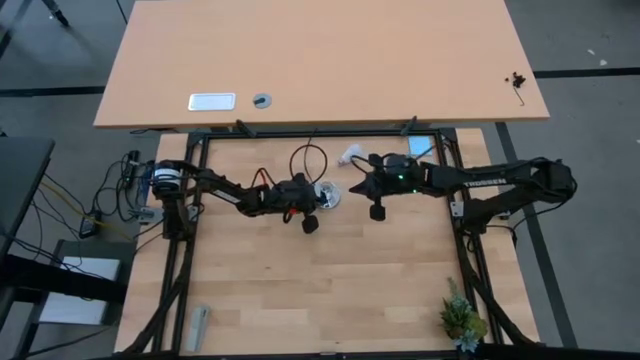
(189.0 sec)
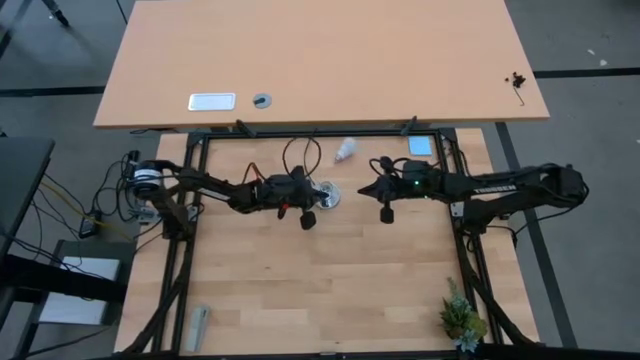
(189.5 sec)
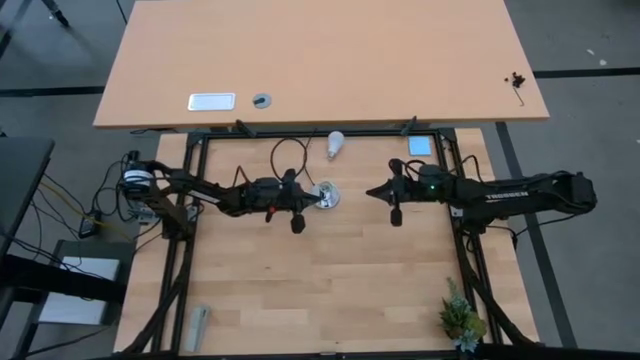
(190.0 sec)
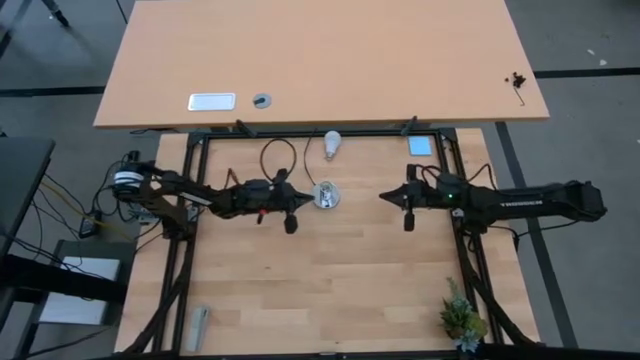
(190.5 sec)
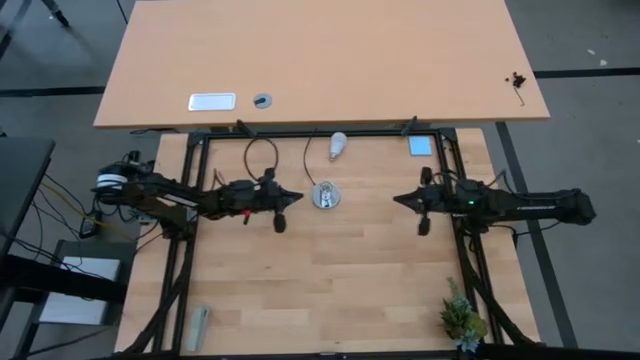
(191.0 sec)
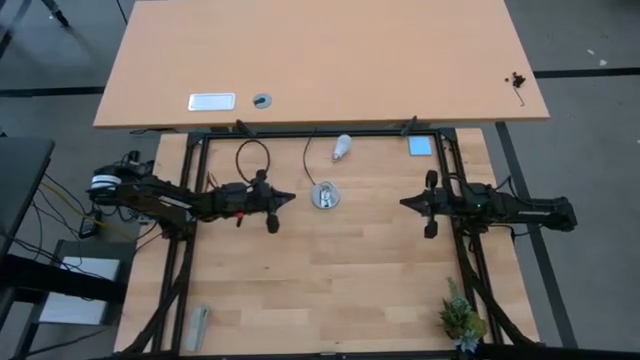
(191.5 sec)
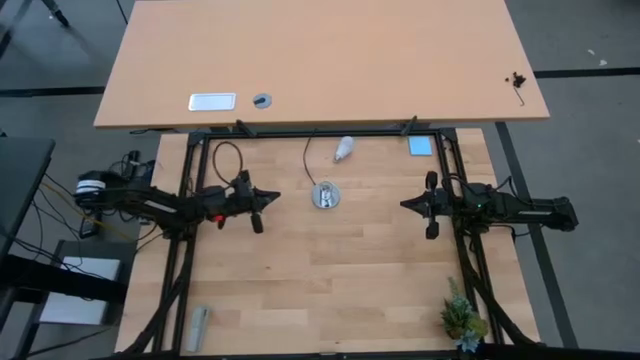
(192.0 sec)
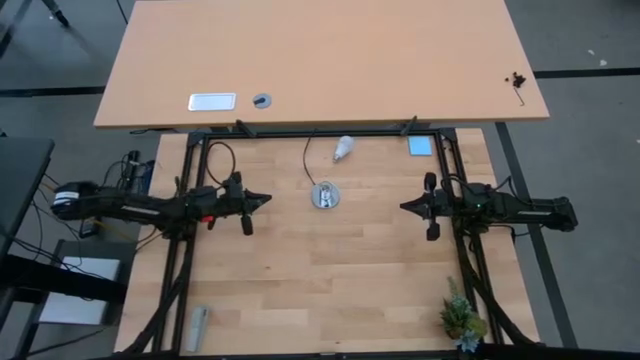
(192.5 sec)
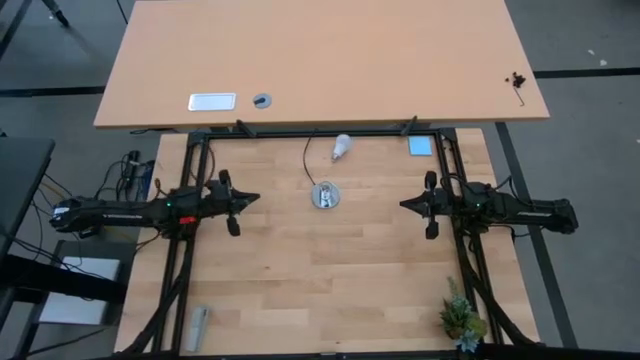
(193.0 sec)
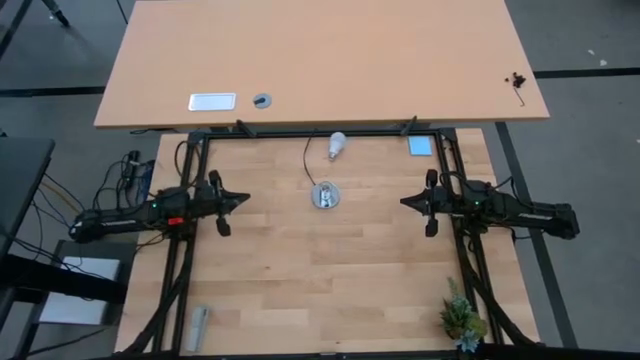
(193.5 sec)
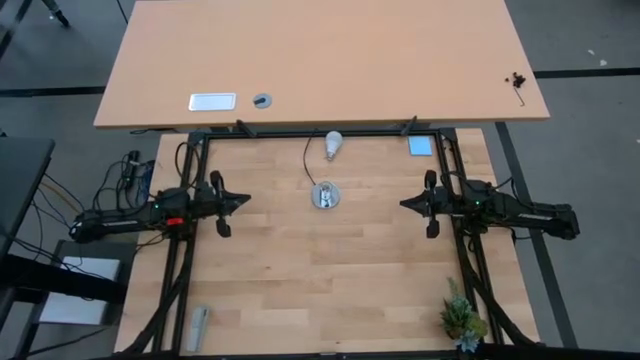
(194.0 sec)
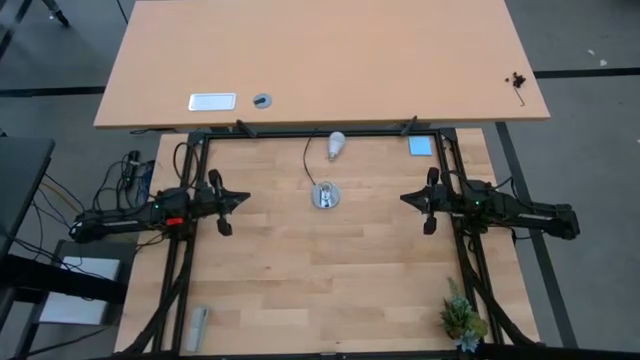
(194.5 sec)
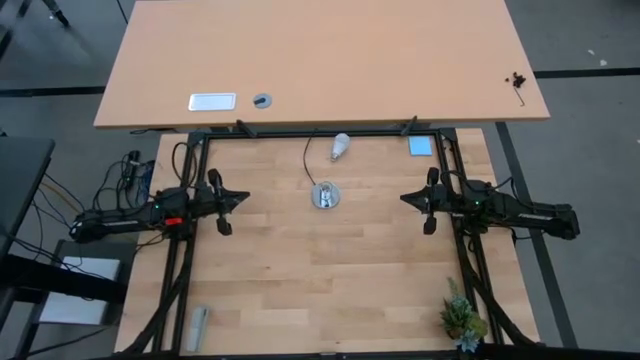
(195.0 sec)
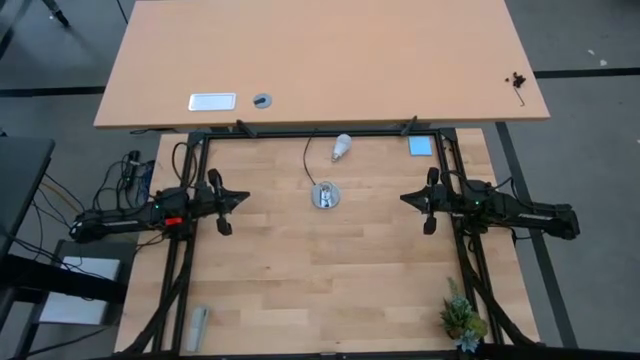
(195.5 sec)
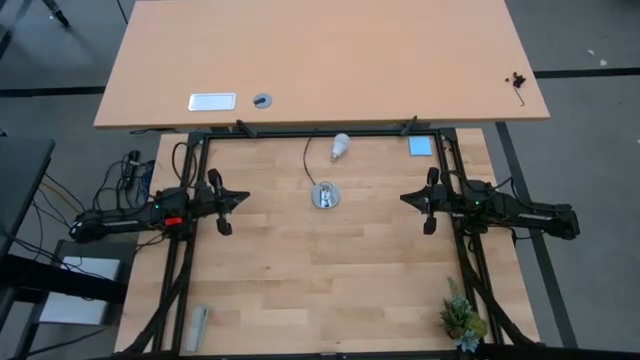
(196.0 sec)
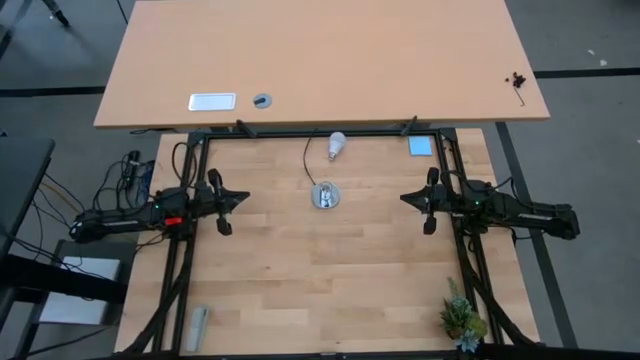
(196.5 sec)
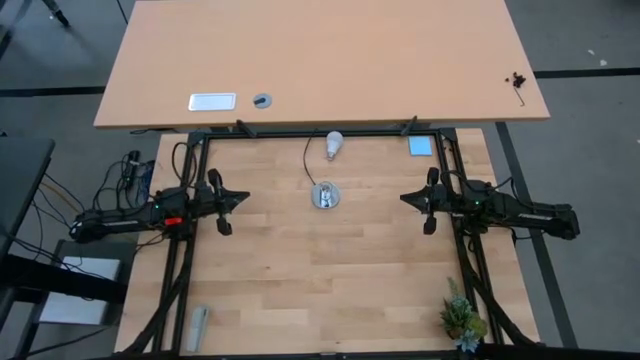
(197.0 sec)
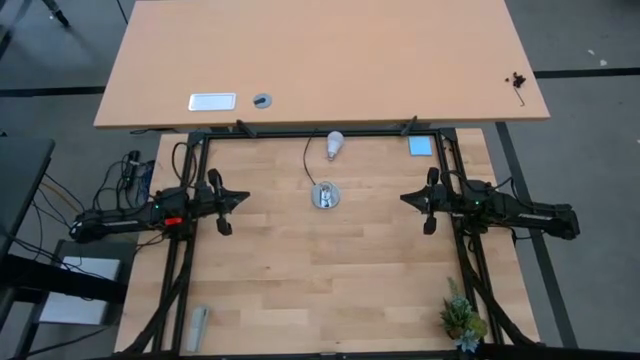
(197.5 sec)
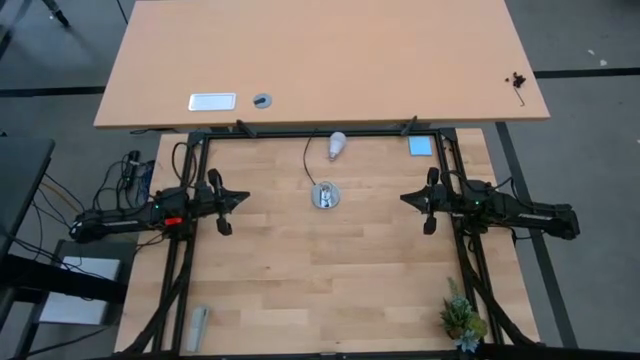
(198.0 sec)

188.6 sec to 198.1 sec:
Task: Screw lightbulb
Return to Home Position

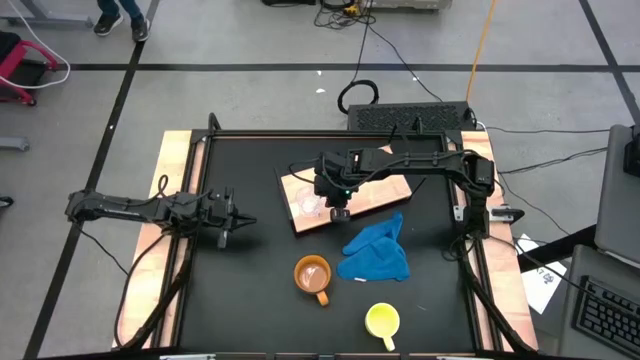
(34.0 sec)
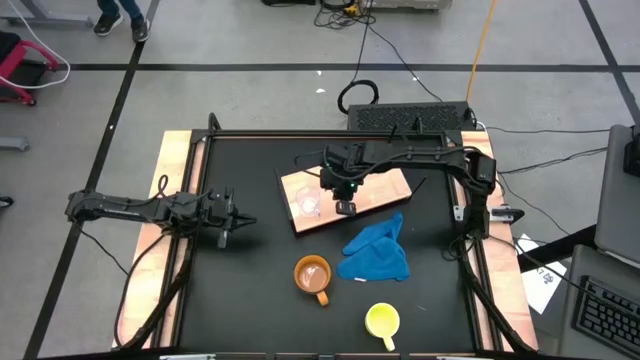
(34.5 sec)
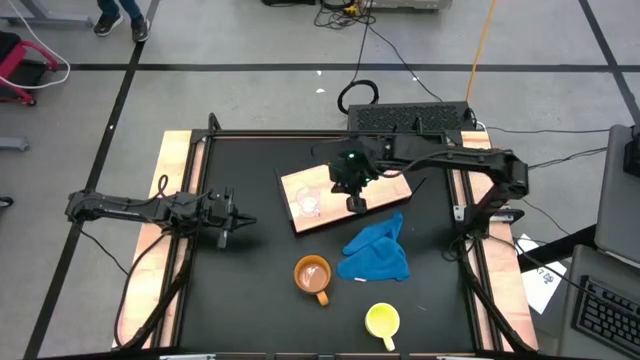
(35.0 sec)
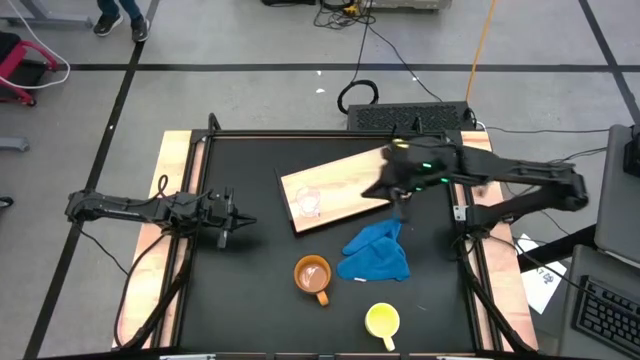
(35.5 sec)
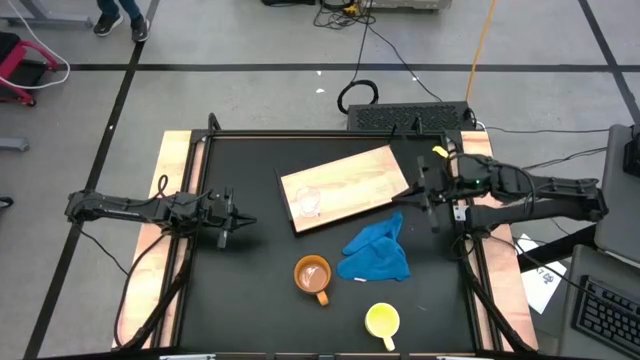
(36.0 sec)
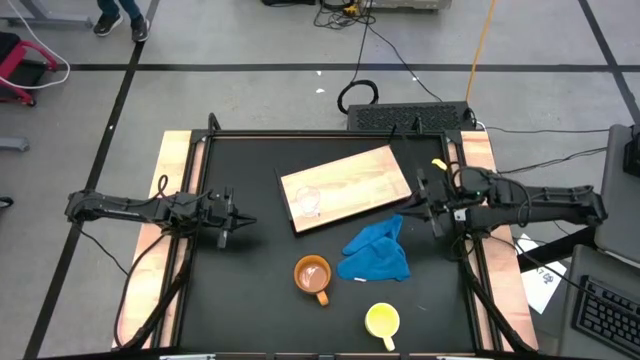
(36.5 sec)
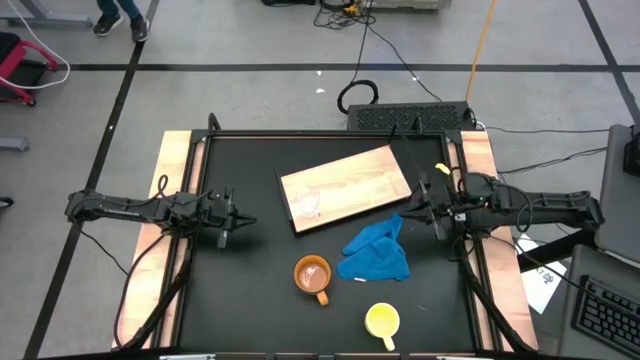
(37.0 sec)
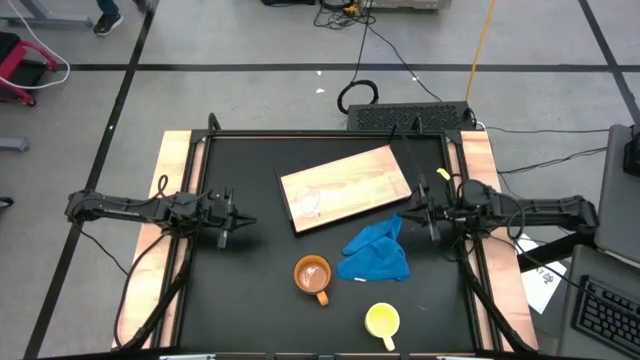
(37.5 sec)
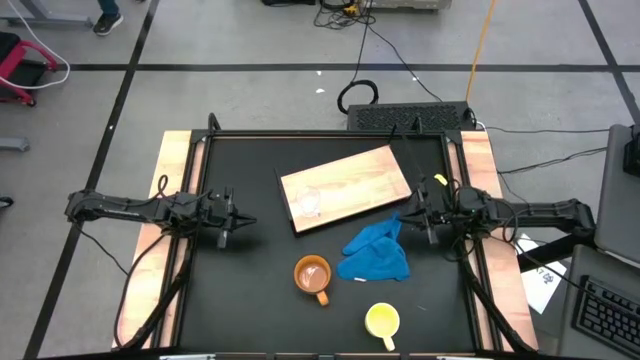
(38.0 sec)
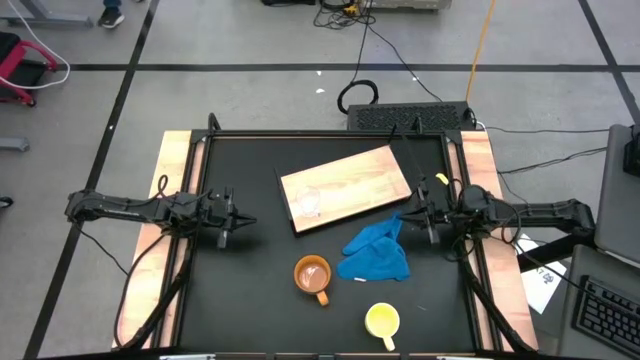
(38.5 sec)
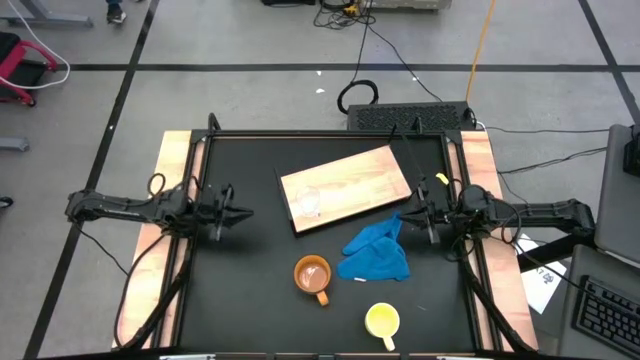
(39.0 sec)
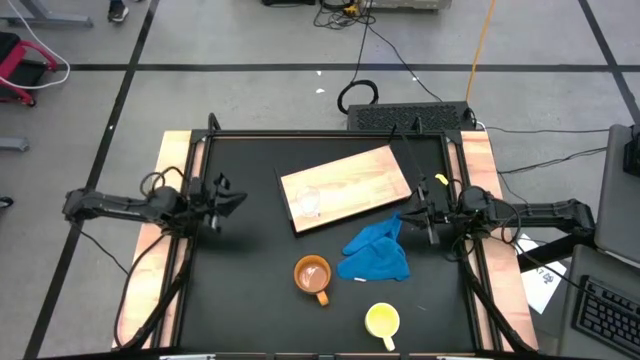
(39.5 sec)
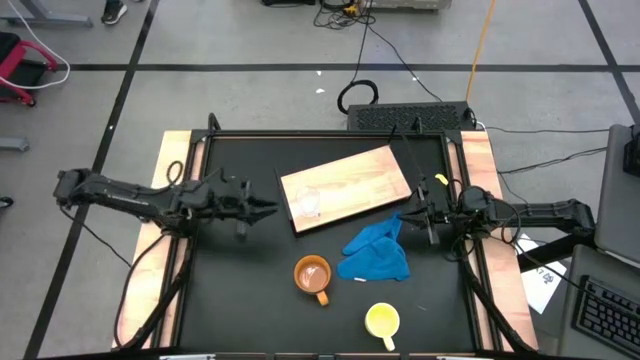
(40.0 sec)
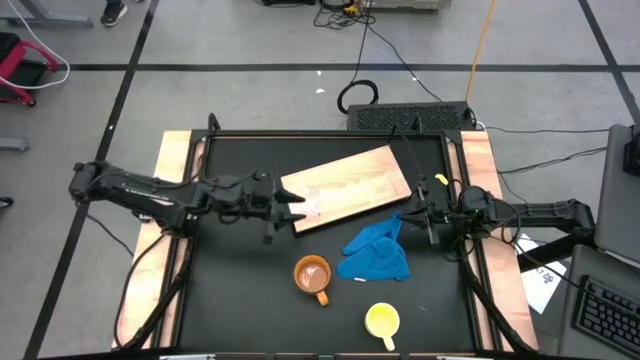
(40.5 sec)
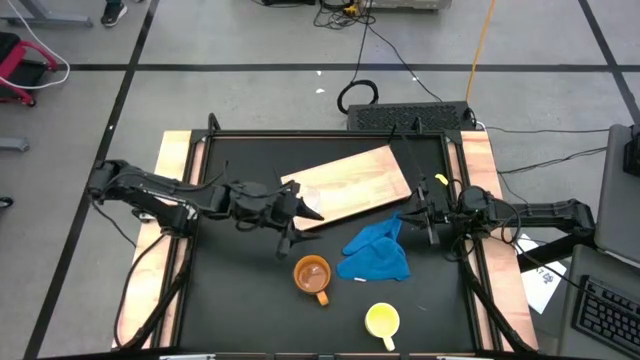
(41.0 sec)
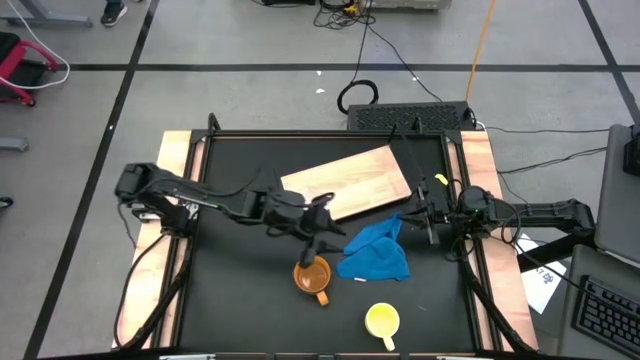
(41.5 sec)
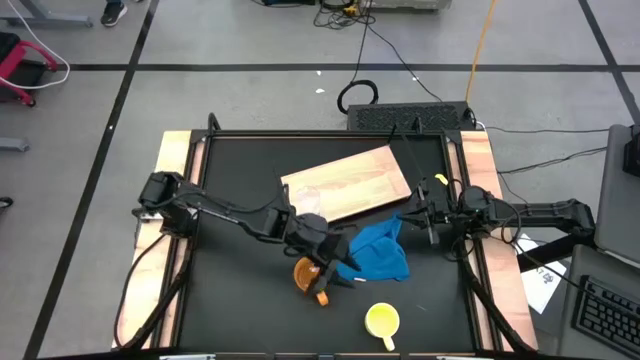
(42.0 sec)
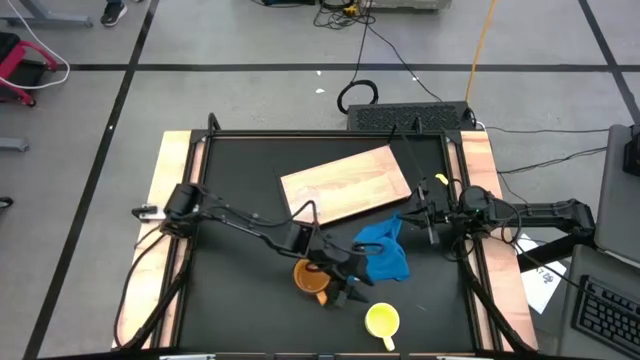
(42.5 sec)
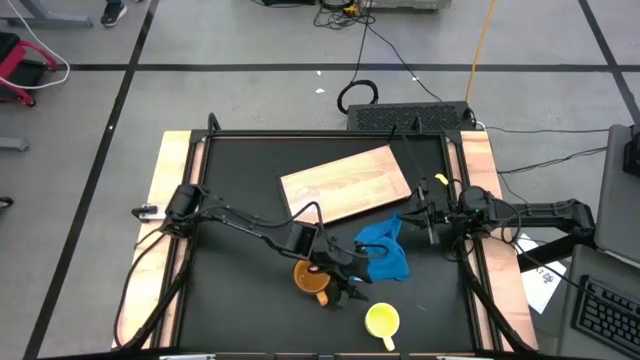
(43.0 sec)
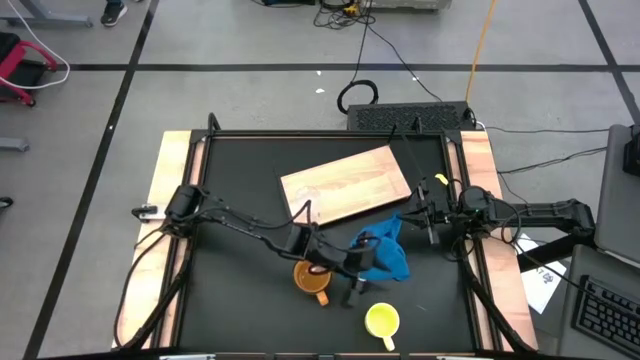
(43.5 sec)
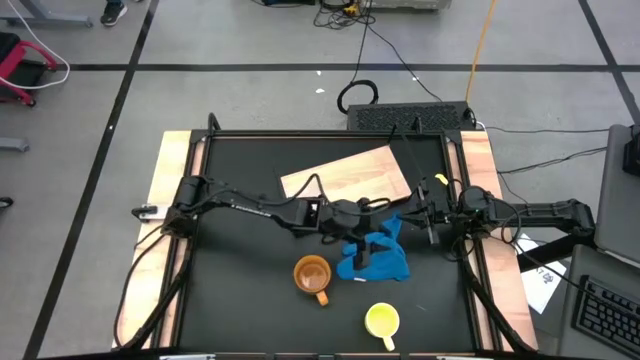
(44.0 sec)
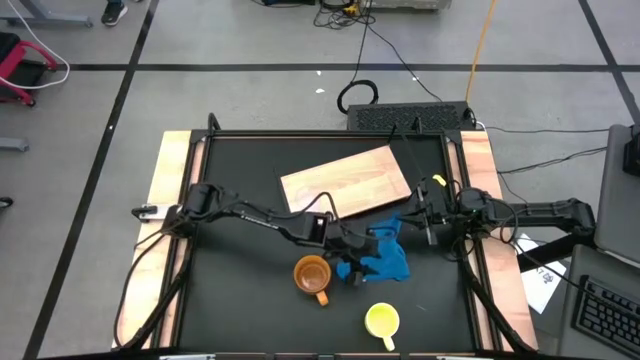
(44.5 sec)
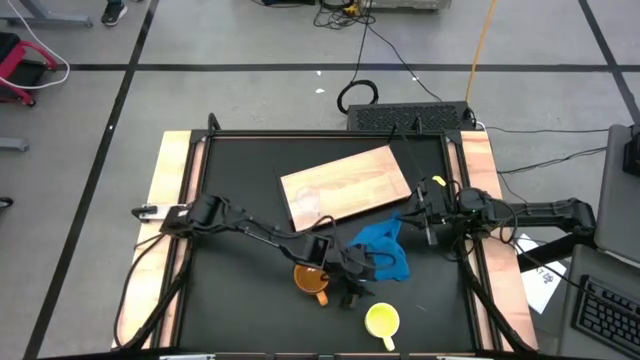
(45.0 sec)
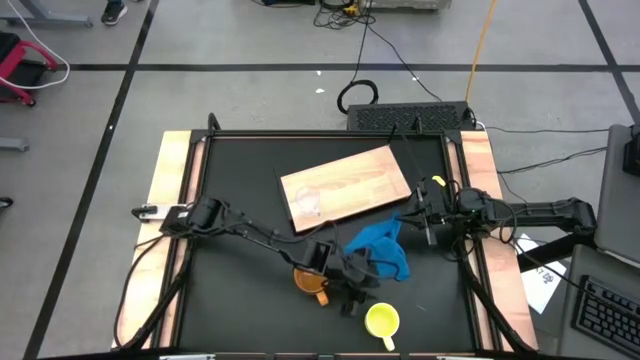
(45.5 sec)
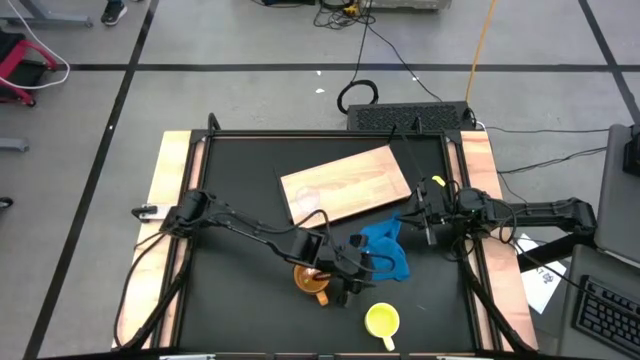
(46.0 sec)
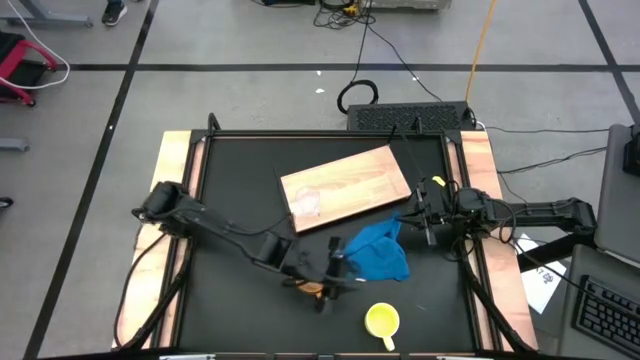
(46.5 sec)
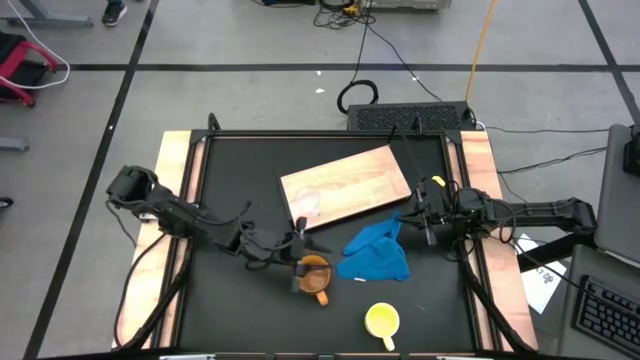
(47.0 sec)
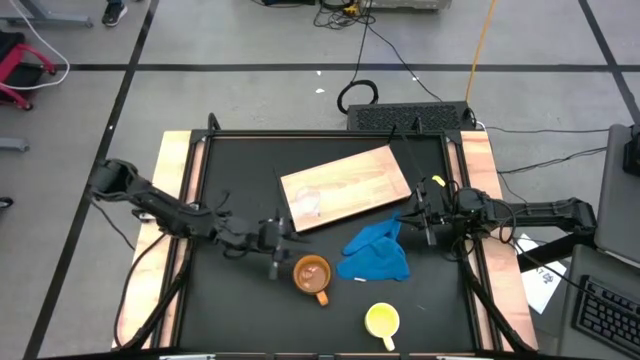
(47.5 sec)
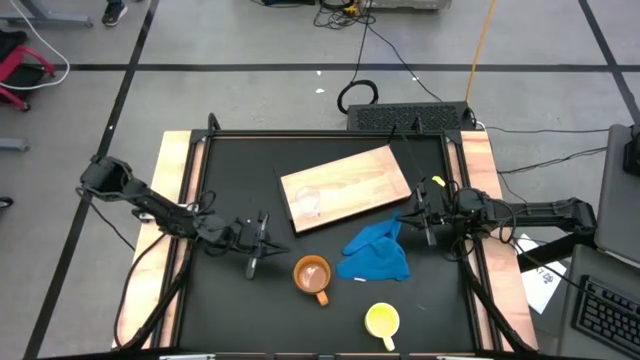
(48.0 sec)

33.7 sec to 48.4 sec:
Task: Stack small to large cups/mugs on shelf
Put the yellow mug on the shelf
